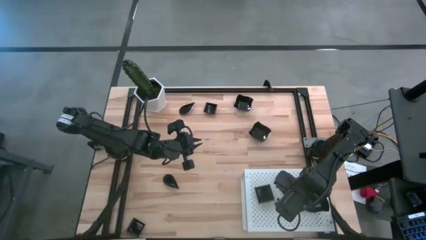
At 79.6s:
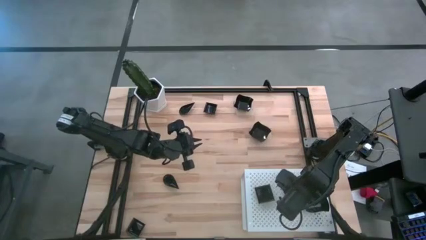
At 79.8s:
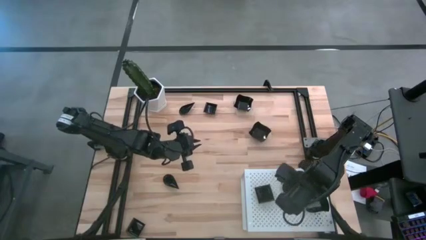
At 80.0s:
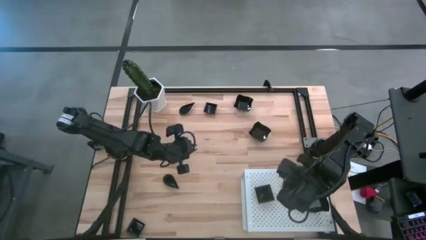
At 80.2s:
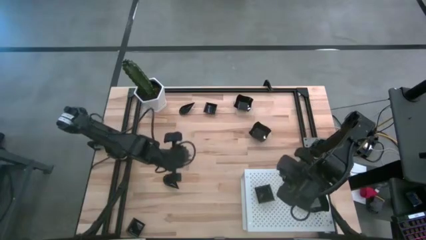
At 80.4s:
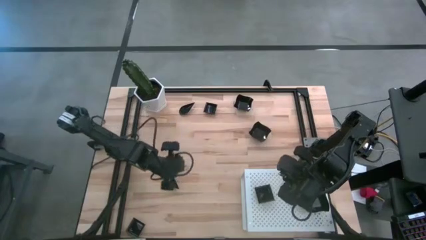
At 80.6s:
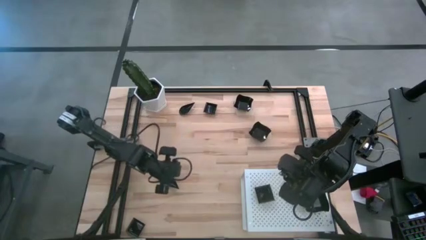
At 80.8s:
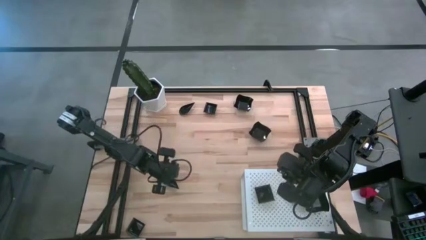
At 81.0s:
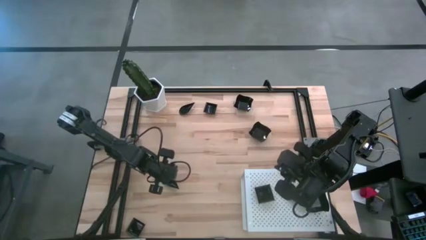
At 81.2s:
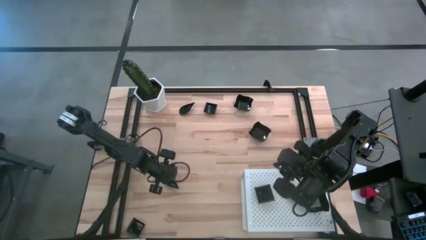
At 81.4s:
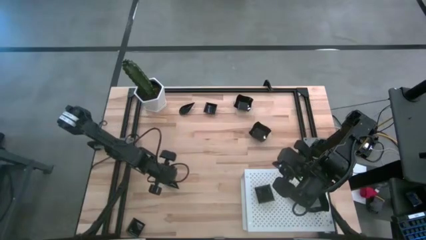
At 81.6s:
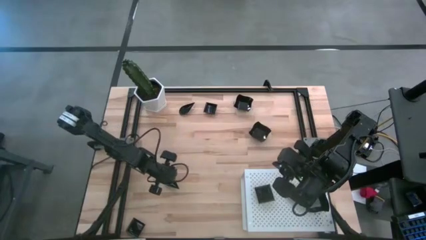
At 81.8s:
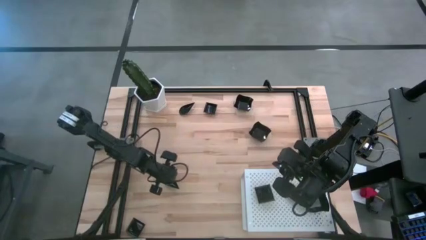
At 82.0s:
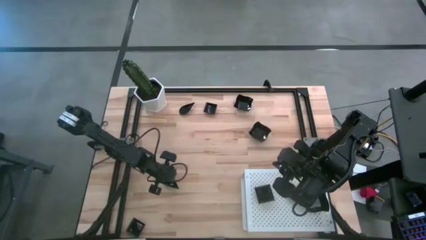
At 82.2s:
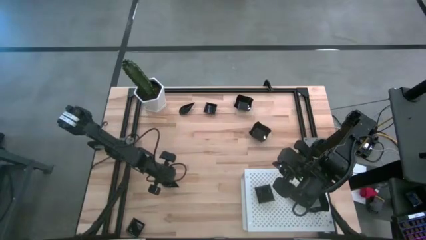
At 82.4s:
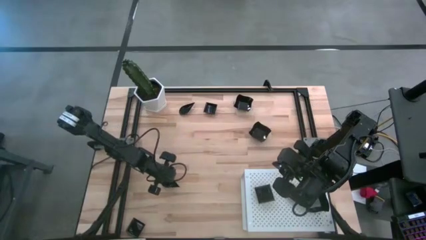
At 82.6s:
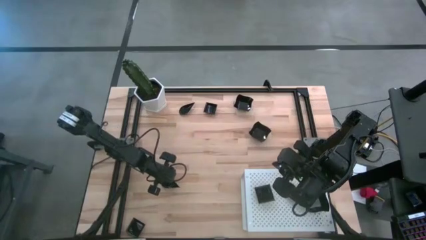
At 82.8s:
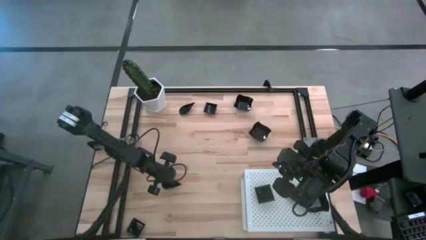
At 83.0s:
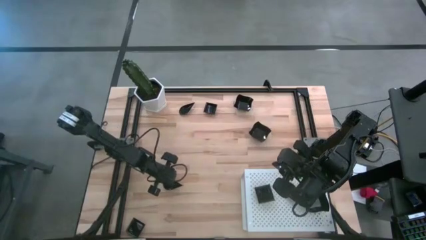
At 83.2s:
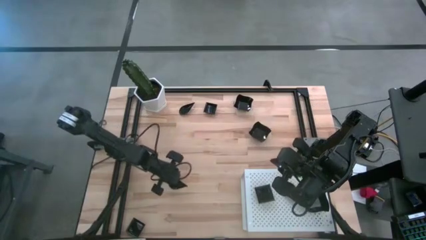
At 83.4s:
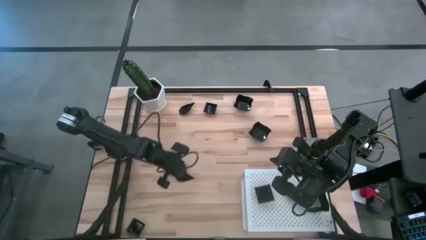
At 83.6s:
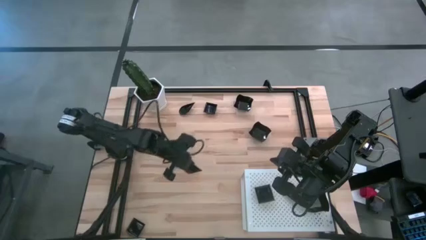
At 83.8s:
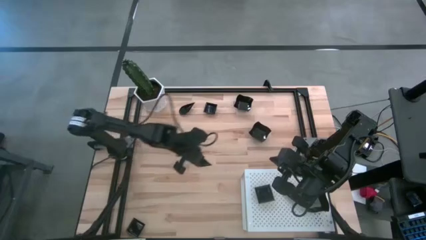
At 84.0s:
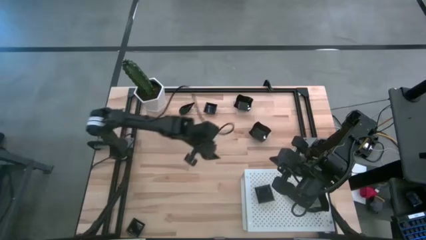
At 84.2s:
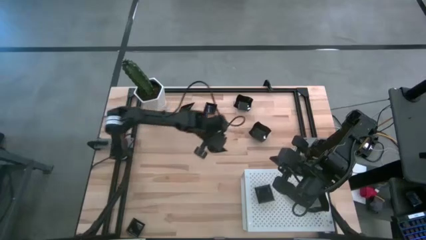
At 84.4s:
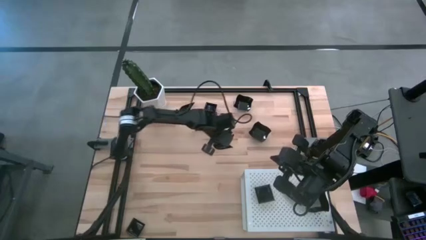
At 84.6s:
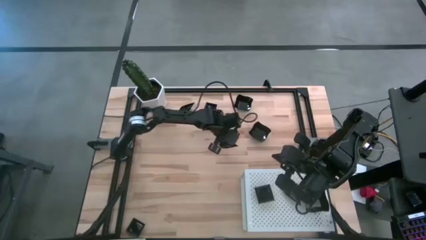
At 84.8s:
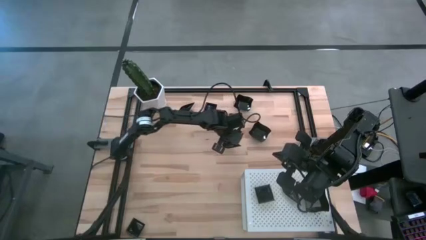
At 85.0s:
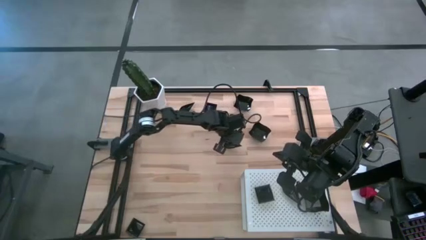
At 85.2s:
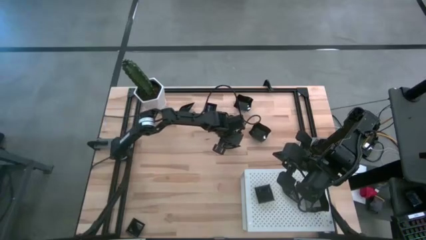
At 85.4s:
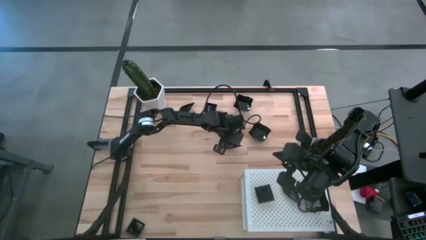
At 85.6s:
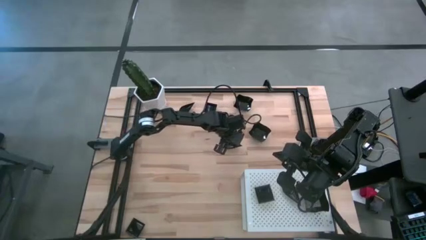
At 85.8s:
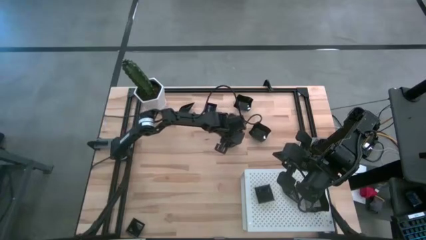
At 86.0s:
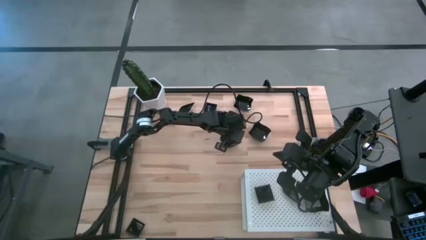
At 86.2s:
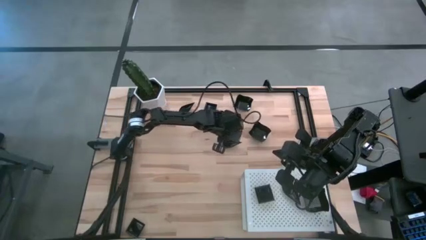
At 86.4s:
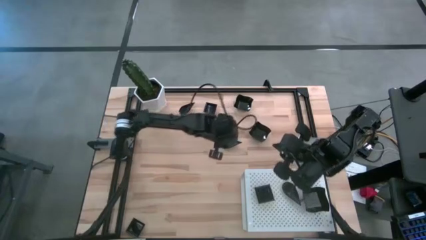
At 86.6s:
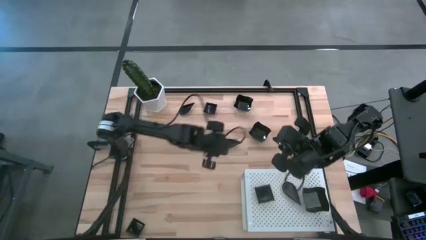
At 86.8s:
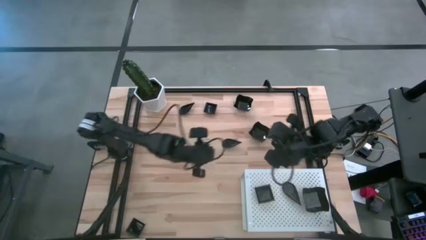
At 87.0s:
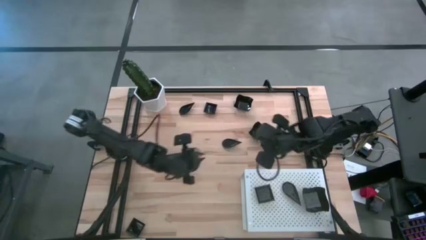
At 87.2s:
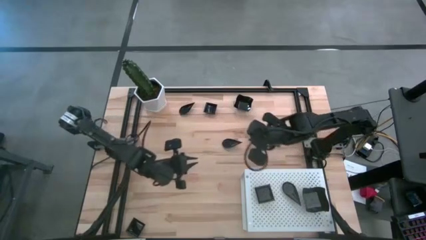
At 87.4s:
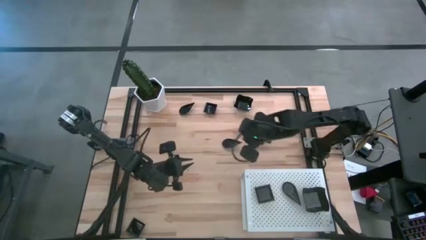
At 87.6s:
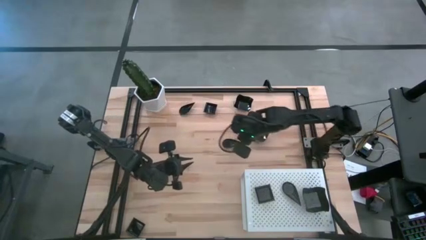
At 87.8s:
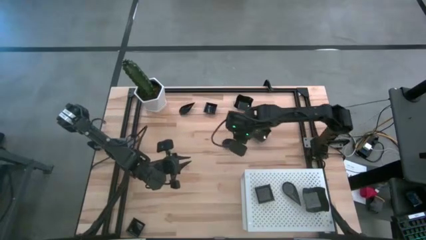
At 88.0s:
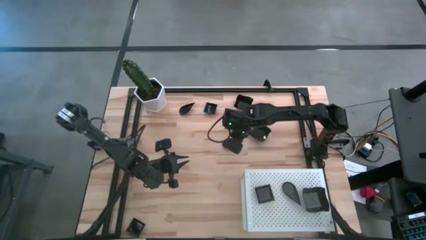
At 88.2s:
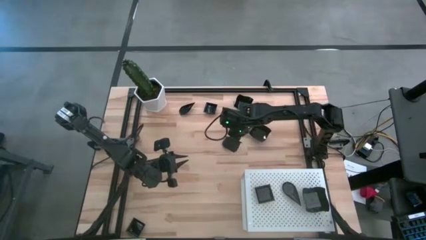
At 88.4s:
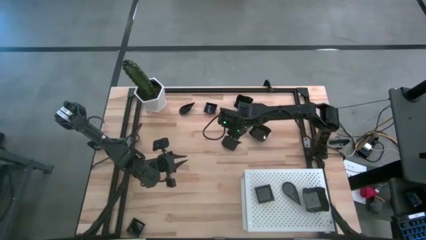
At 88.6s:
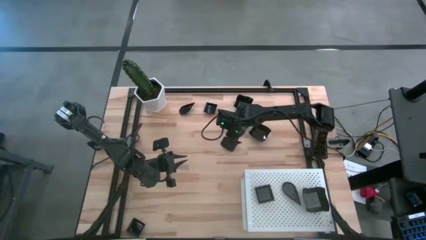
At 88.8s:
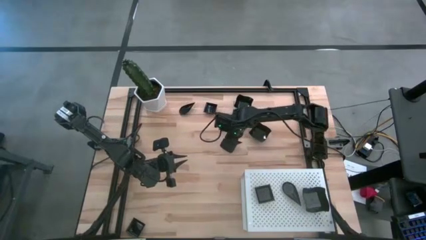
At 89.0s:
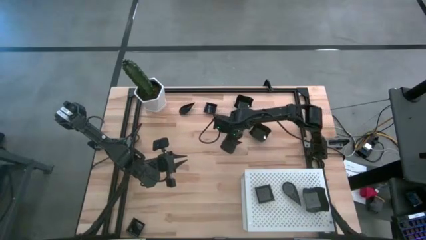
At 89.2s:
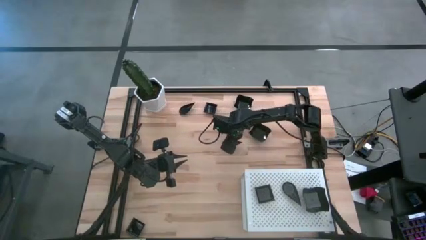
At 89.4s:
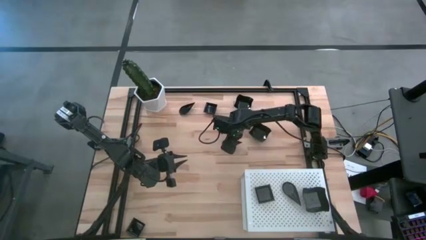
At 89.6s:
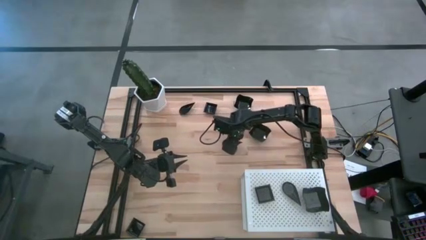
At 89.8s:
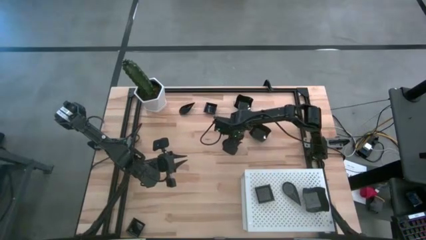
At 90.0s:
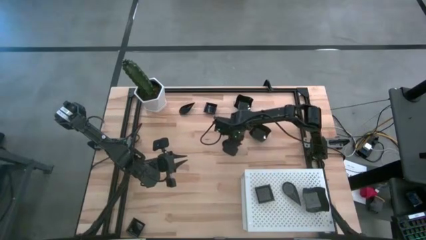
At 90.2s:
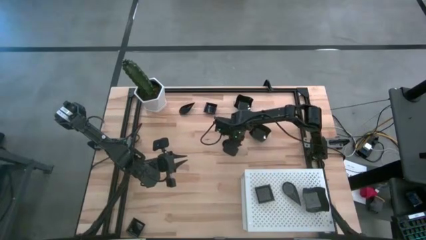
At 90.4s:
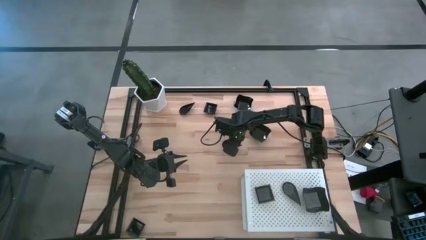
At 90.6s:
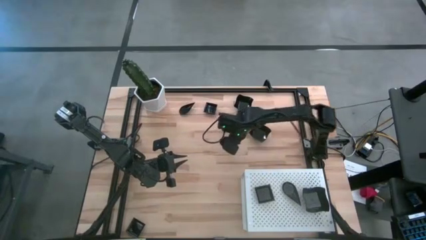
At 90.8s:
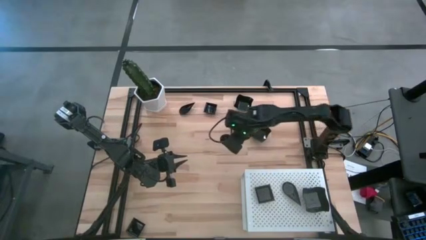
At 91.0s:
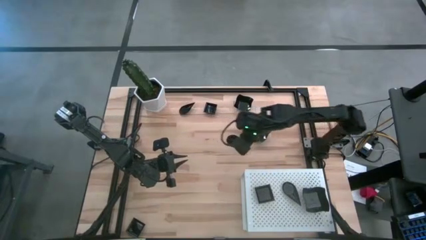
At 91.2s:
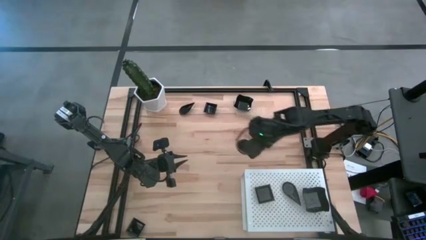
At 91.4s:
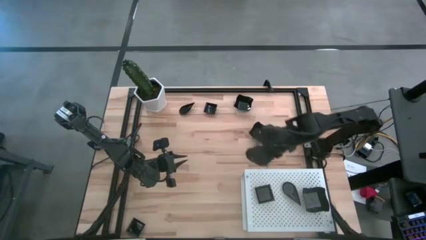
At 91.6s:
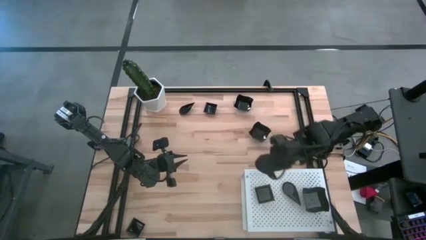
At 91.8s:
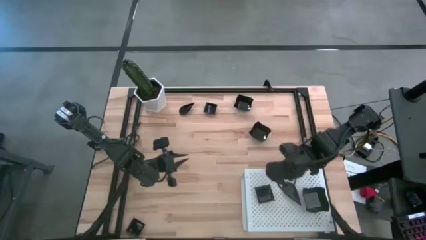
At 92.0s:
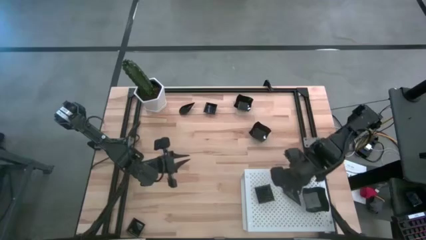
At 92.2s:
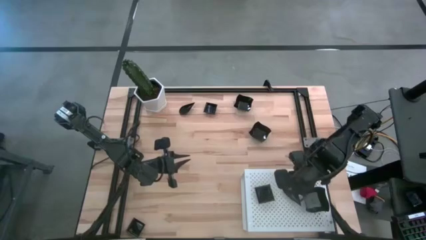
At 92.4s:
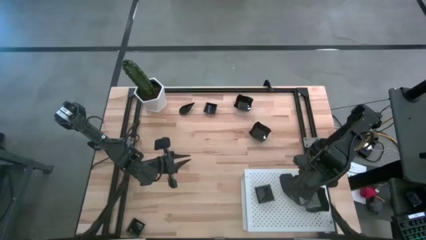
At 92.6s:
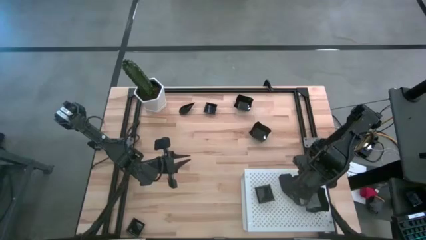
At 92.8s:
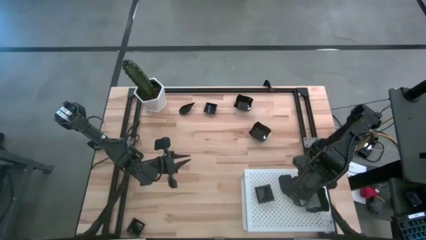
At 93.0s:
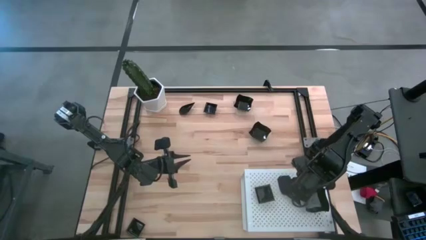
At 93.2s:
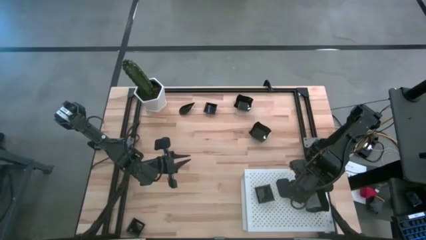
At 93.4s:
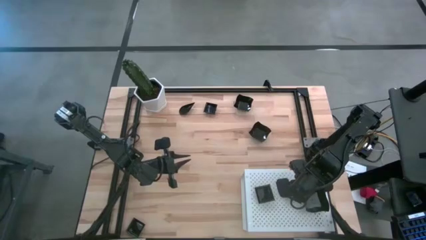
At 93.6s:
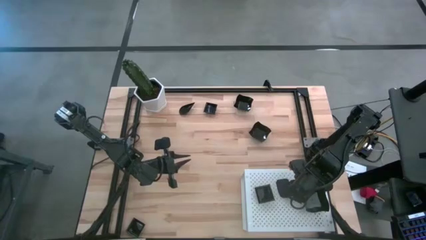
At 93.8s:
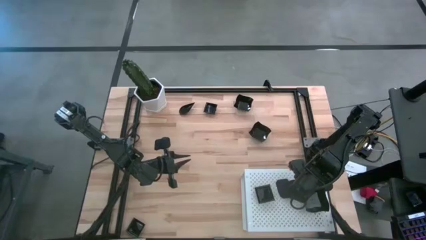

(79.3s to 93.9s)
Task: Pick & Place Mini shaped plates
Stack the drop-shaped plate on top of the other drop-shaped plates on the shelf

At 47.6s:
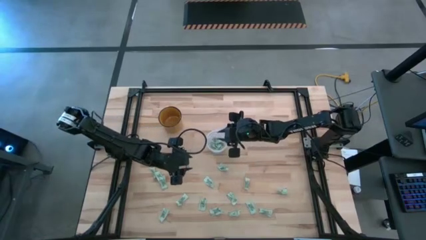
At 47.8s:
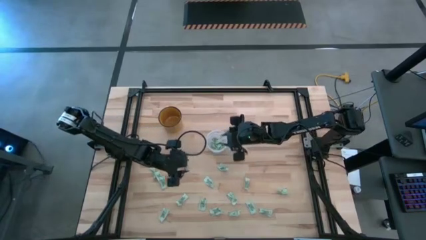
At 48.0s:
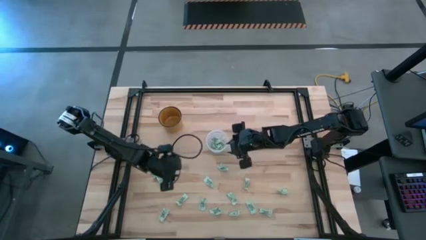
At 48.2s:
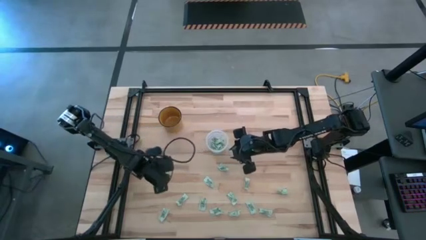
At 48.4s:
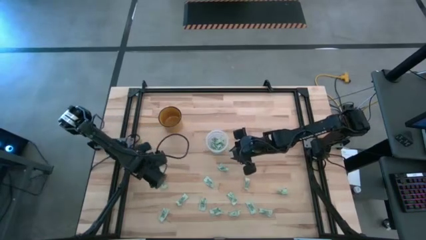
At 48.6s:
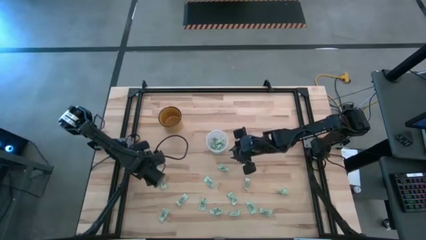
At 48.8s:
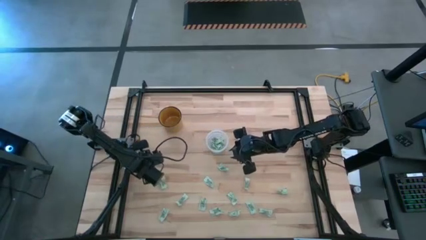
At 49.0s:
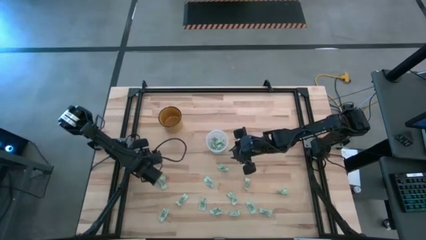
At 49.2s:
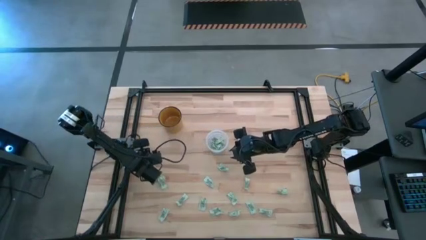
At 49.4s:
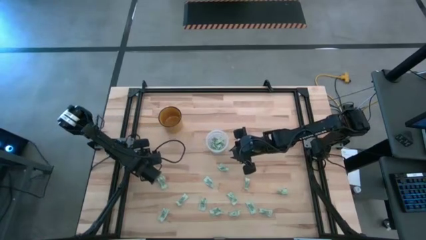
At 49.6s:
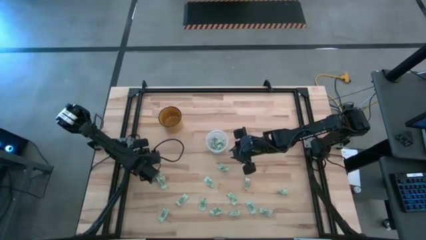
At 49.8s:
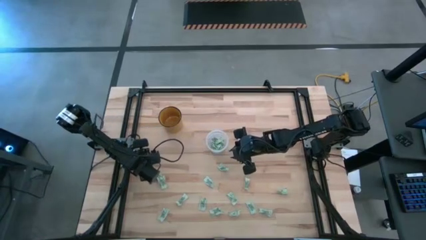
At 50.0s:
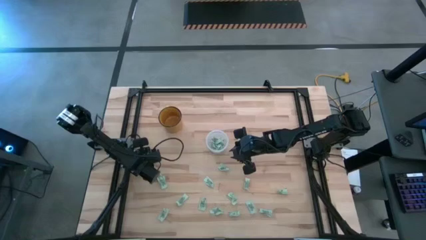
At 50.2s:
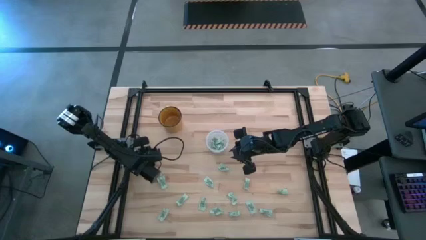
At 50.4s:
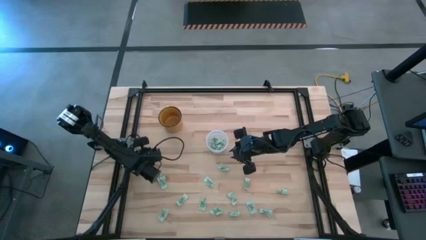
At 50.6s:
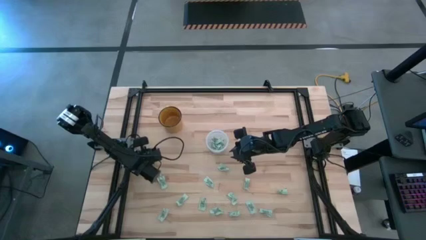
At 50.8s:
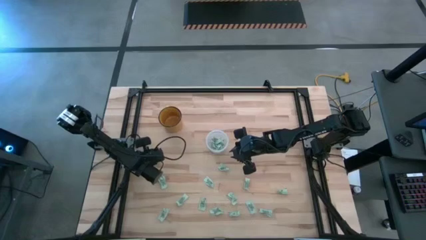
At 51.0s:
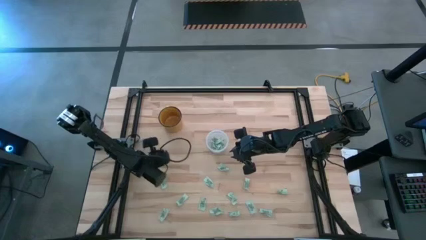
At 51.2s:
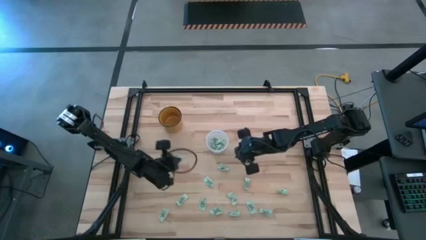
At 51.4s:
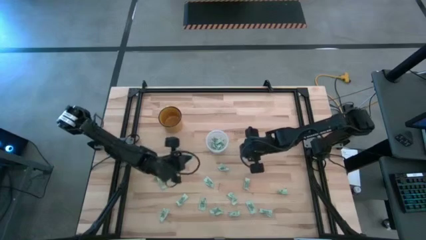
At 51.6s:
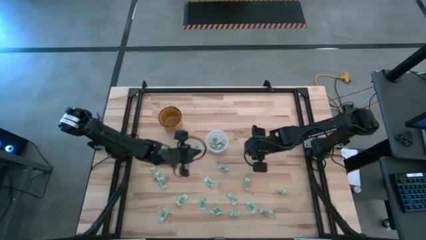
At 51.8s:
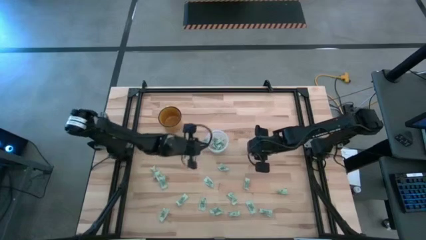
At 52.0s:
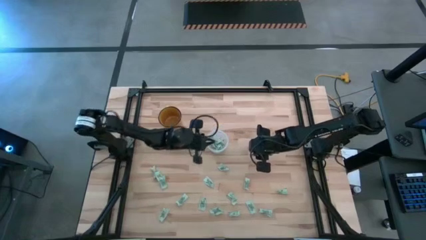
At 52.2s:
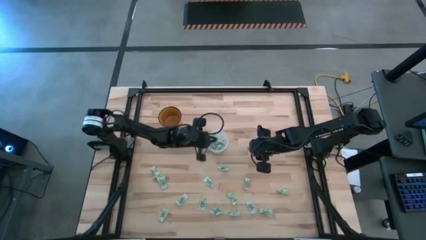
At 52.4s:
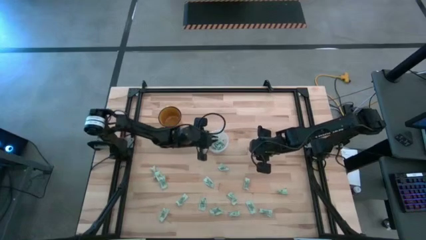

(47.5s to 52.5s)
Task: Pick and place Stevia / Truvia into bins
Put the stevia packet into the transparent container
